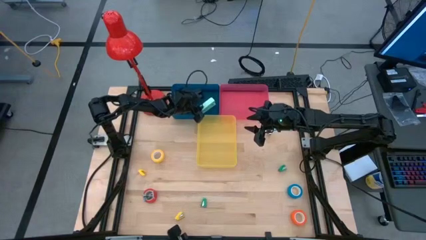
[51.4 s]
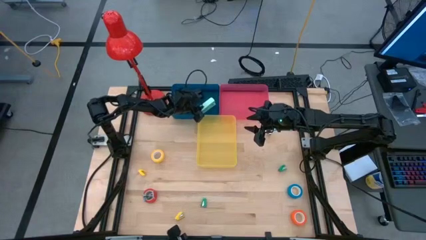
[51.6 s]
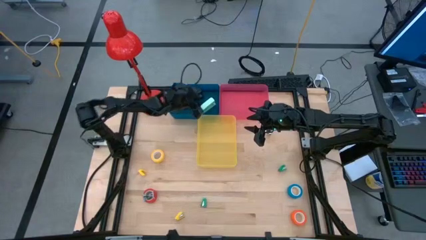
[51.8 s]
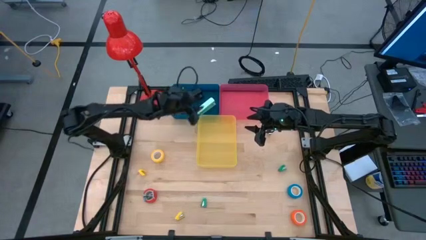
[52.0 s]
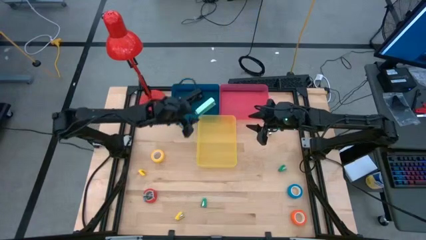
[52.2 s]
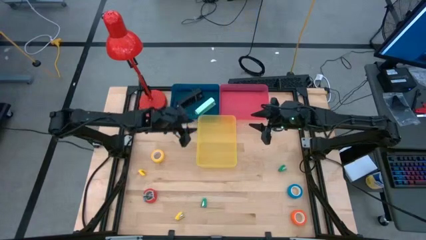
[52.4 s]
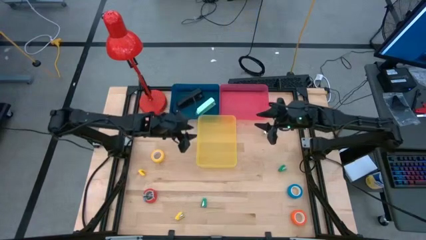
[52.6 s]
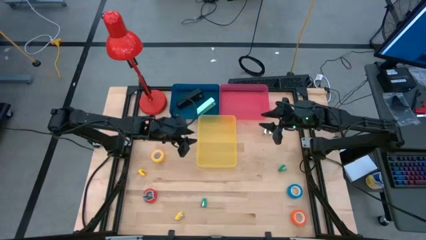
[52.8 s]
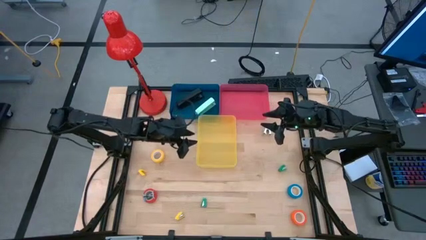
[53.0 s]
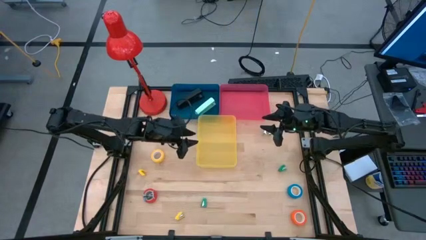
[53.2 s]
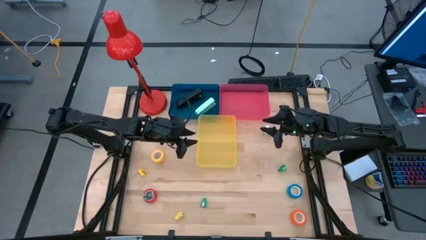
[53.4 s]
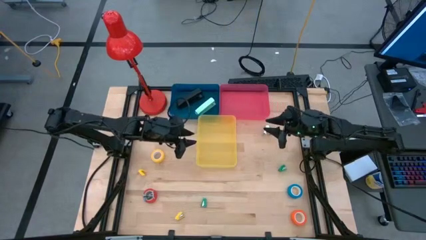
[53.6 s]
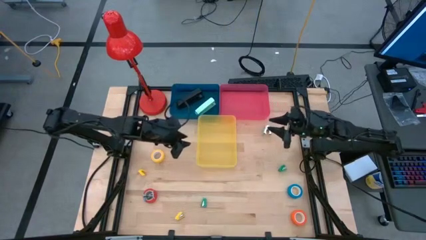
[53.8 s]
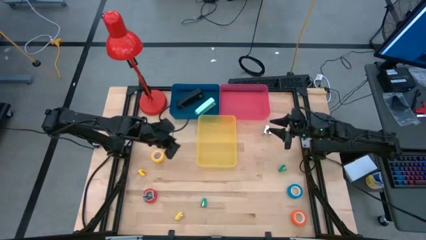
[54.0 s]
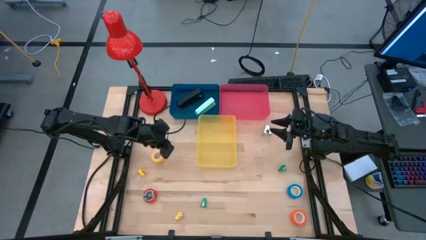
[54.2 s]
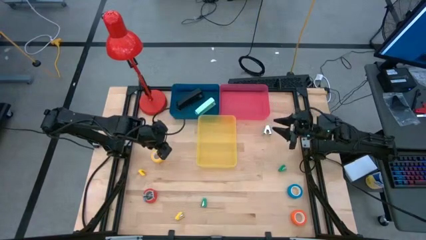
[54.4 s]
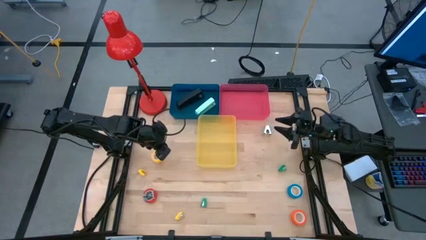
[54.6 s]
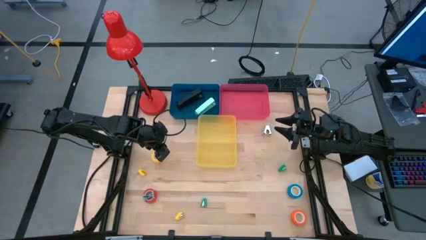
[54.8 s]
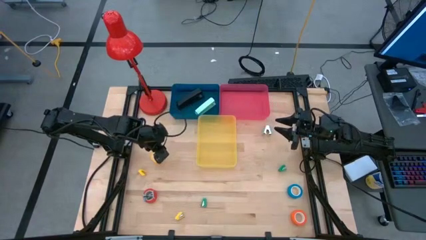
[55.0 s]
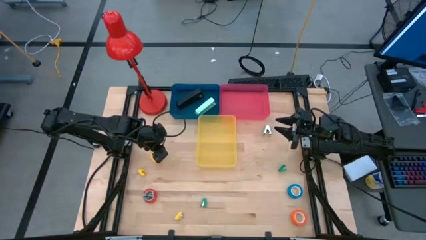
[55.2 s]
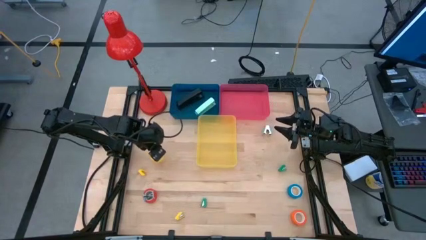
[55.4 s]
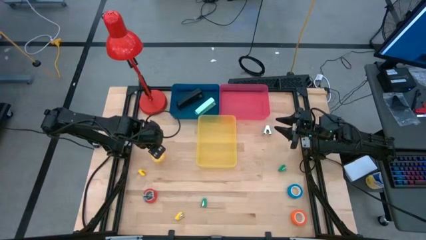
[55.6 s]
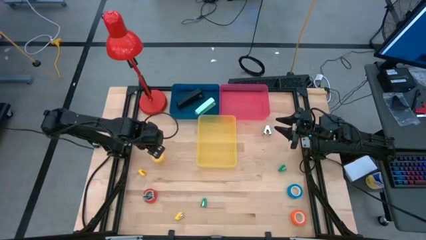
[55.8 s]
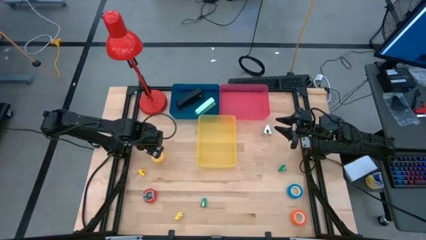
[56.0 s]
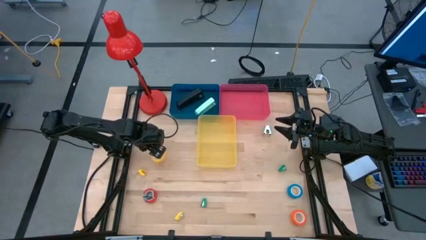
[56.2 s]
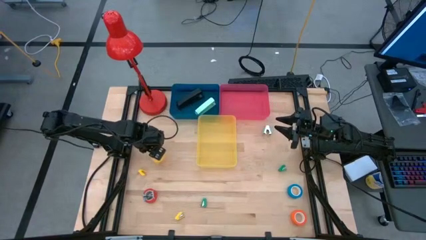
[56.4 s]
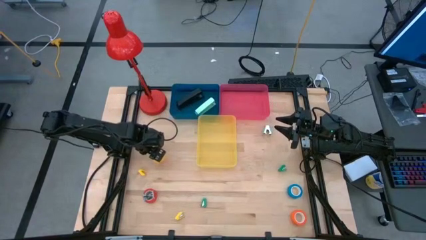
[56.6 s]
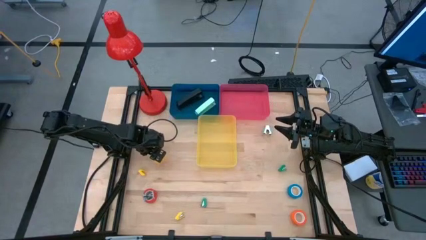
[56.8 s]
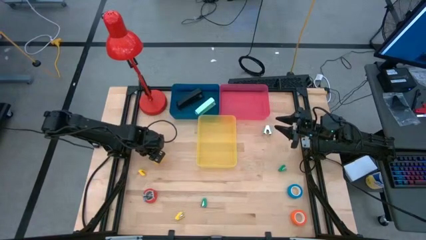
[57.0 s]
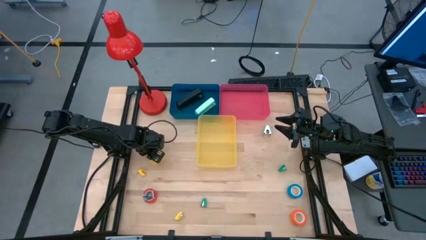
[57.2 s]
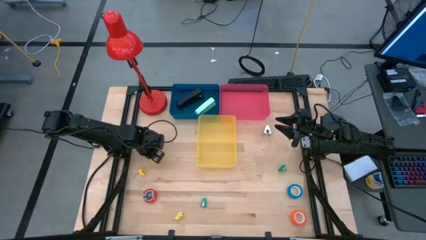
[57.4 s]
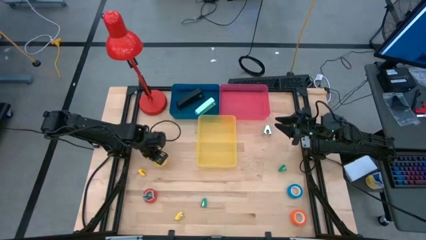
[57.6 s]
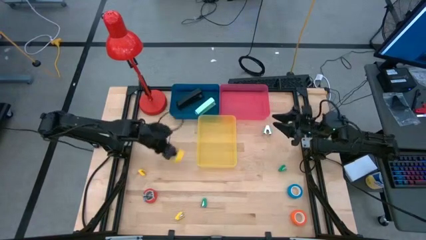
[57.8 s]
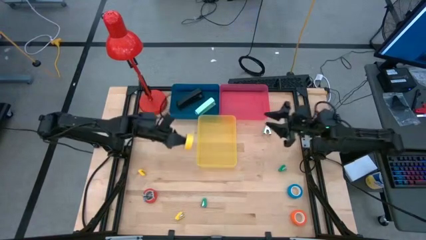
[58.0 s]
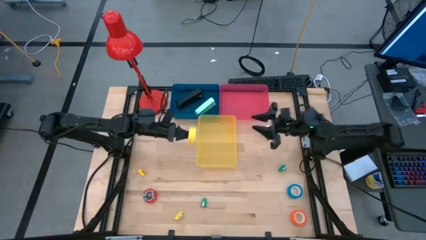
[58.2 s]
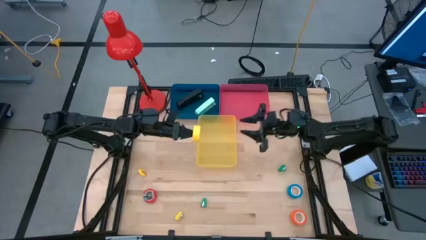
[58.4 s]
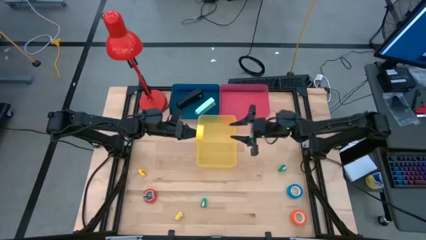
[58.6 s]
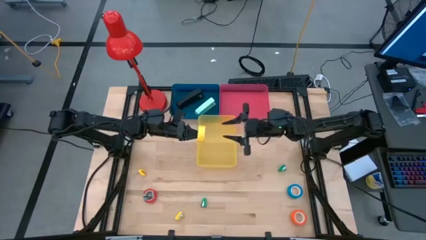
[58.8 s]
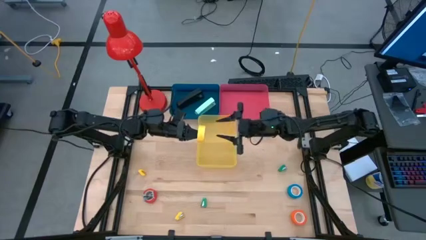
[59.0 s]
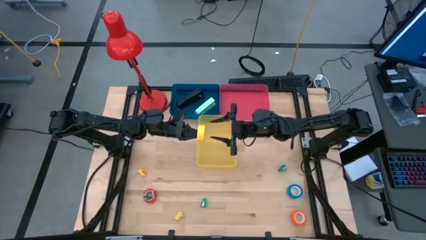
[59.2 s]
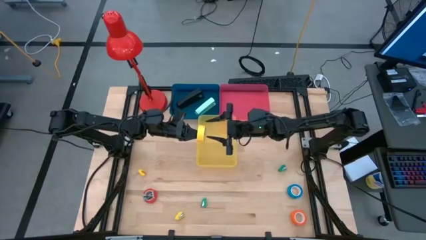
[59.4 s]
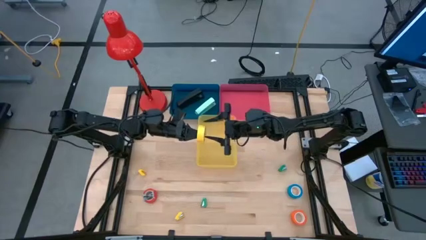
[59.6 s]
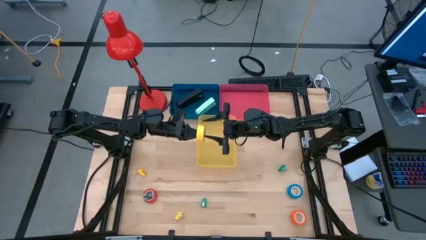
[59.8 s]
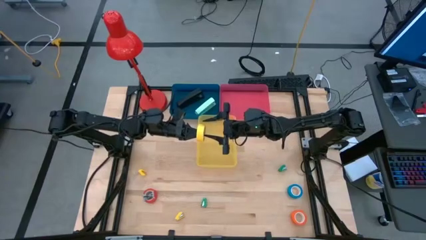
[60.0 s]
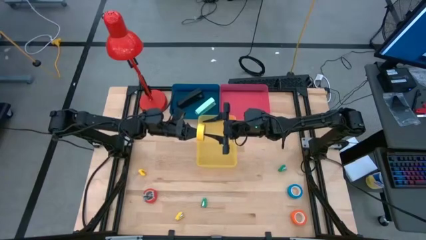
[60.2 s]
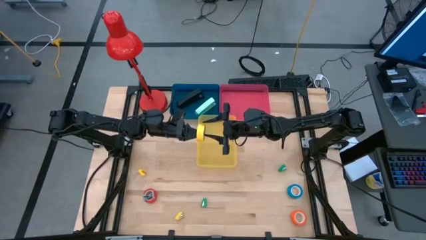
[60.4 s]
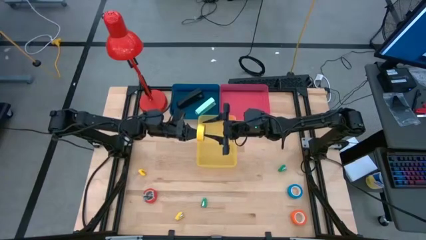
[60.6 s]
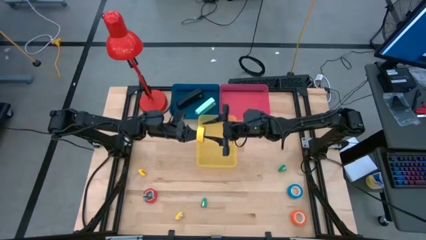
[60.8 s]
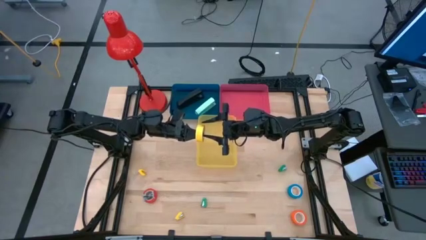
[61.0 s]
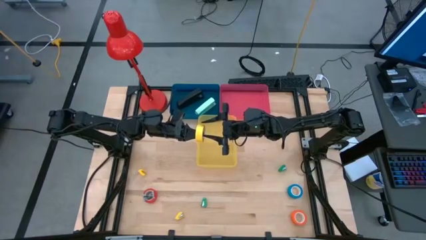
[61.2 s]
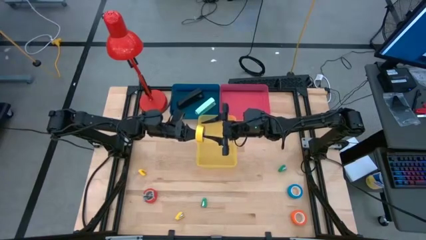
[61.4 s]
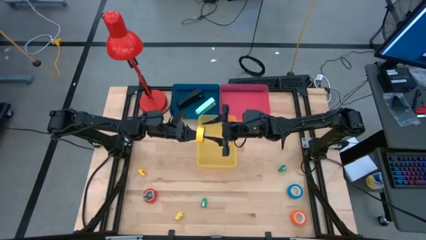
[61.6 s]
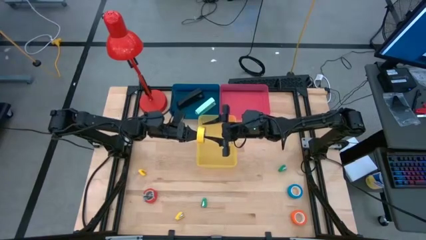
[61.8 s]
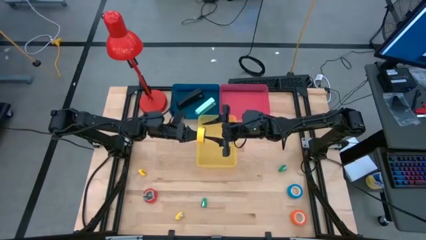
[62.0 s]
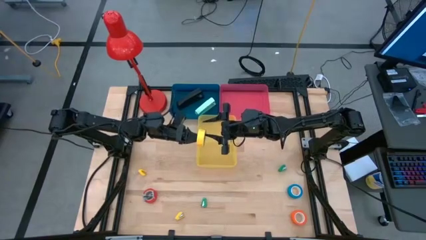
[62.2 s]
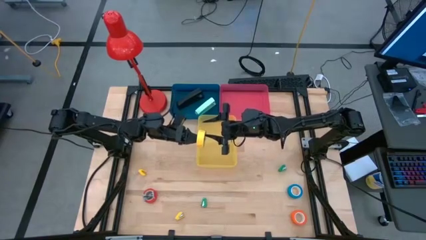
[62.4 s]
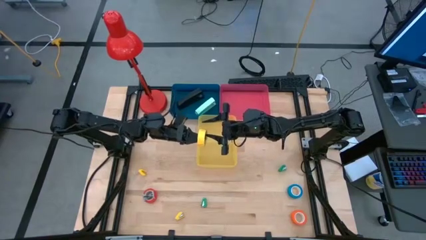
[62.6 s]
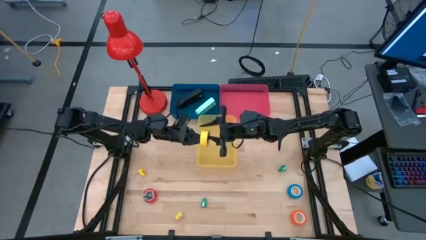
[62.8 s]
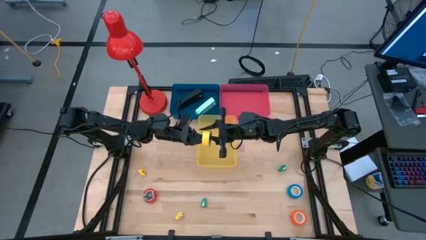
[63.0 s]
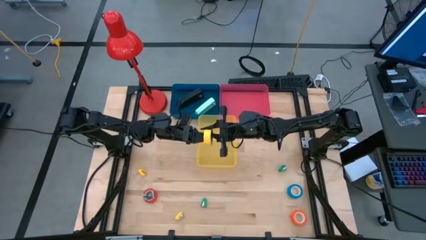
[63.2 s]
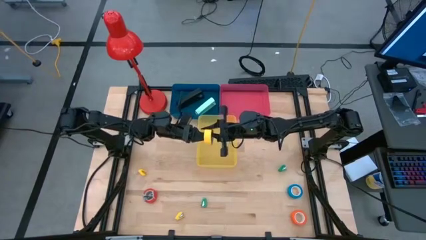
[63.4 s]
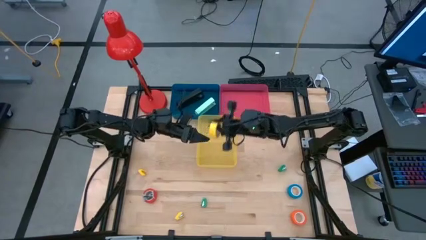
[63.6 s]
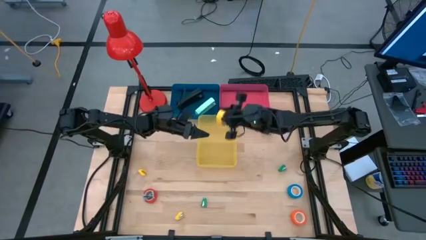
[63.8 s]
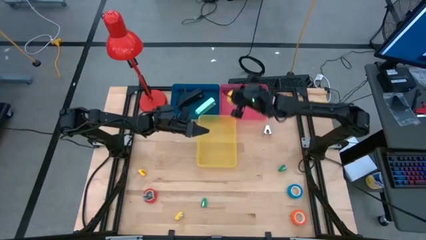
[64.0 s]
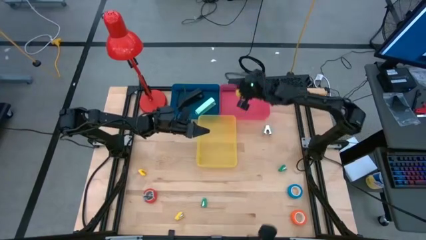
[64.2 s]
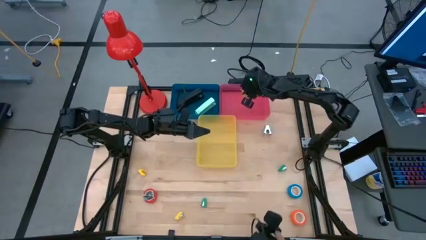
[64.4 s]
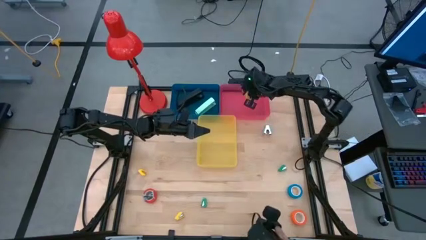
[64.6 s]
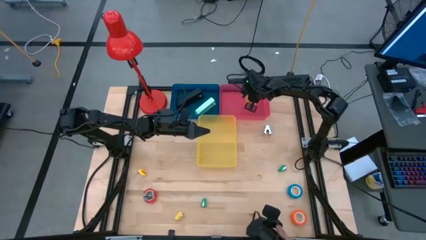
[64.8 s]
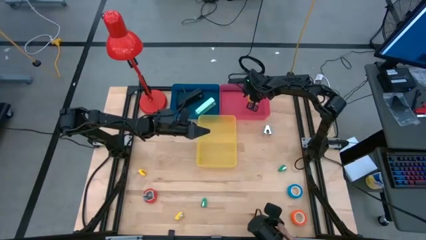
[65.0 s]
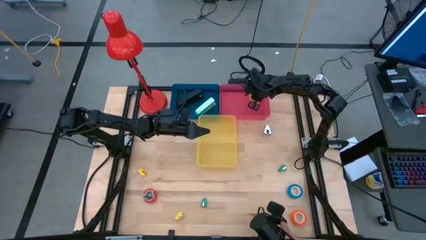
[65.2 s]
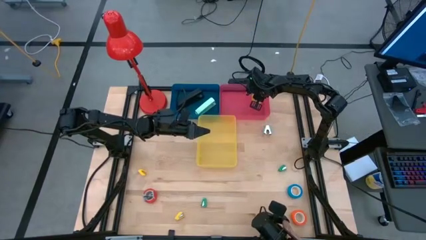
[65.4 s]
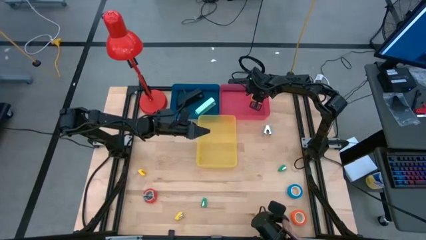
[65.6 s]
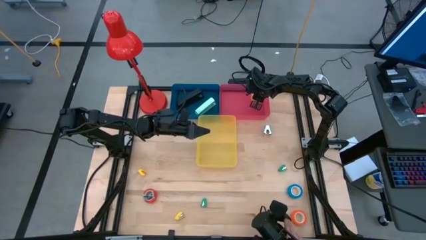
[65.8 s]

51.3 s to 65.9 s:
Task: Pick and place Stapler, Stapler remover, tape
Put the yellow tape into the pink bin
